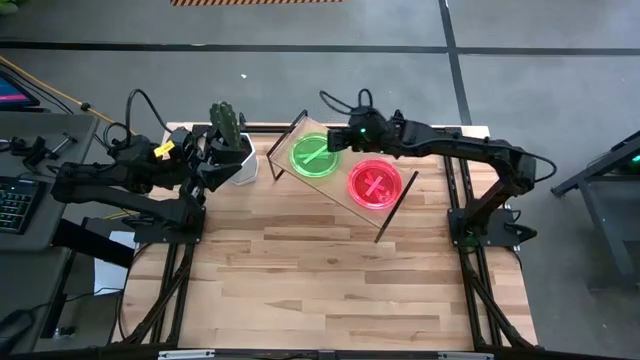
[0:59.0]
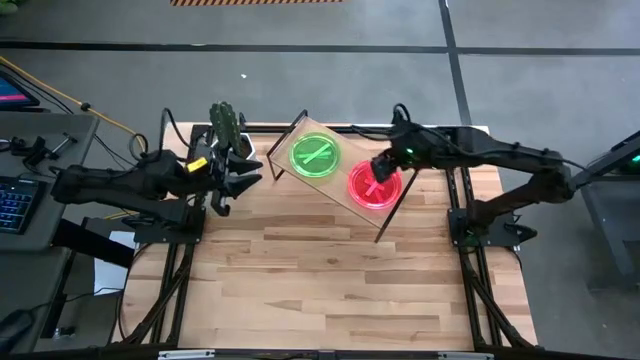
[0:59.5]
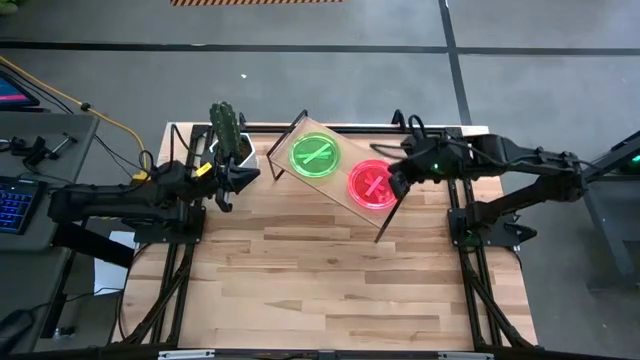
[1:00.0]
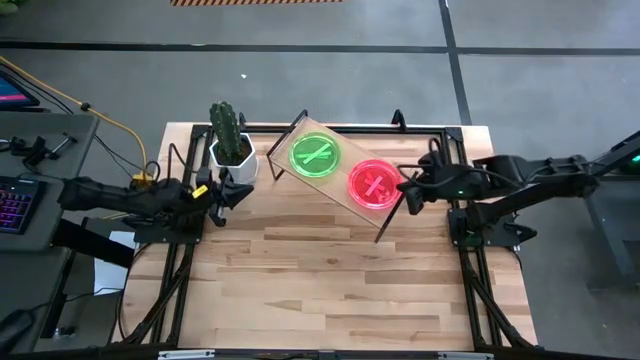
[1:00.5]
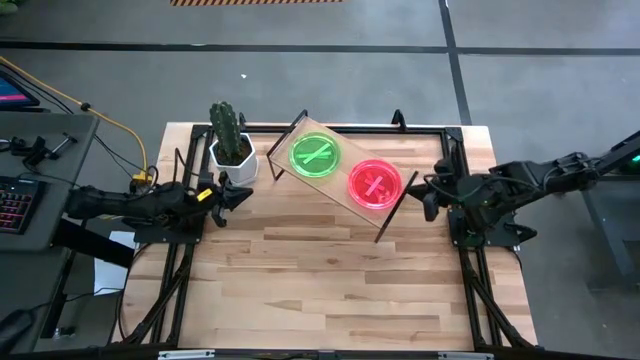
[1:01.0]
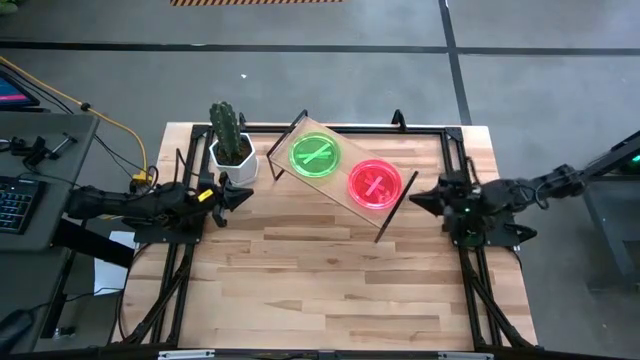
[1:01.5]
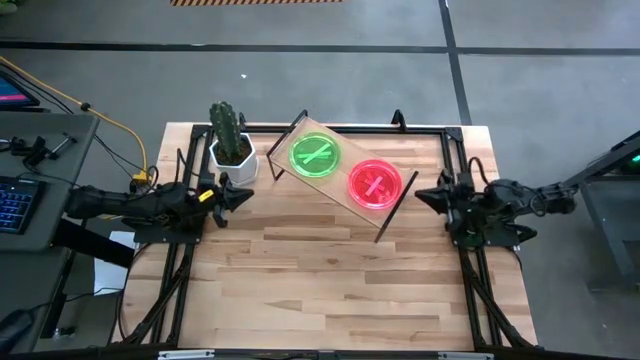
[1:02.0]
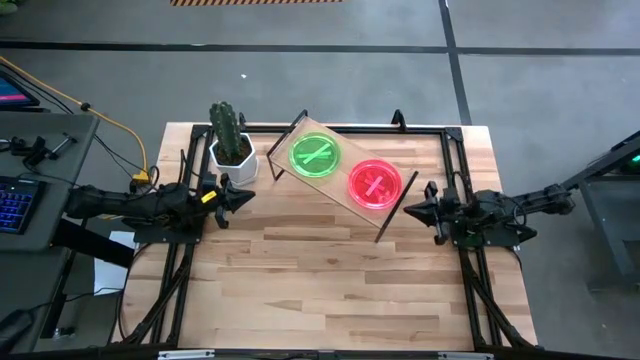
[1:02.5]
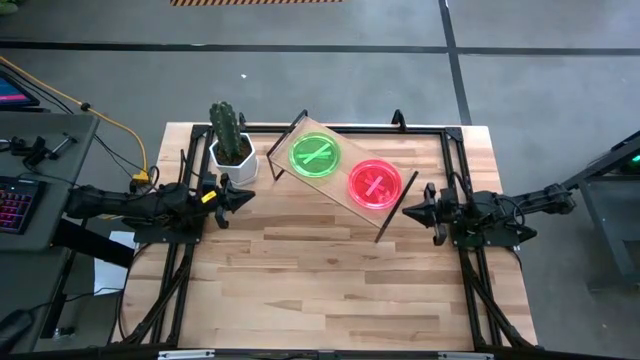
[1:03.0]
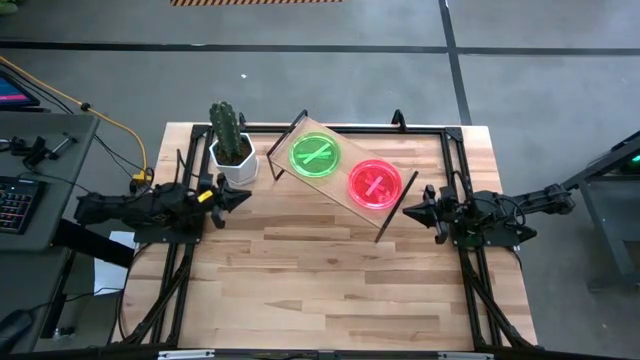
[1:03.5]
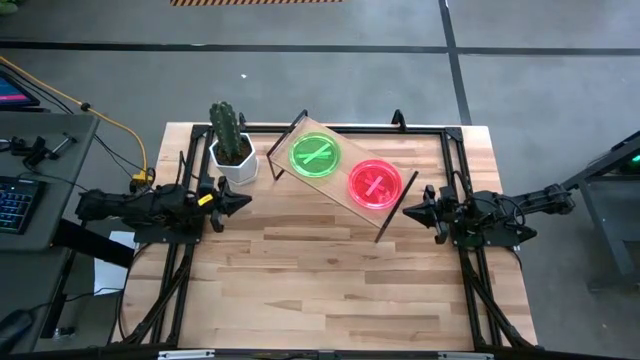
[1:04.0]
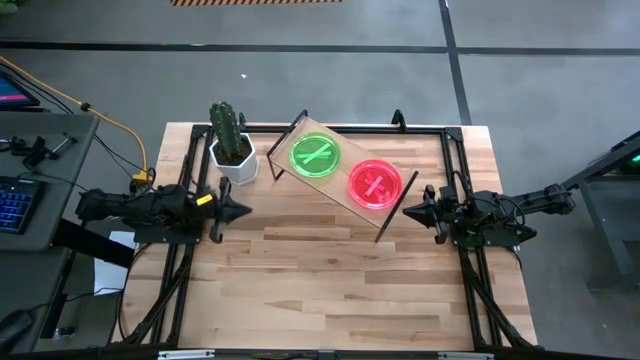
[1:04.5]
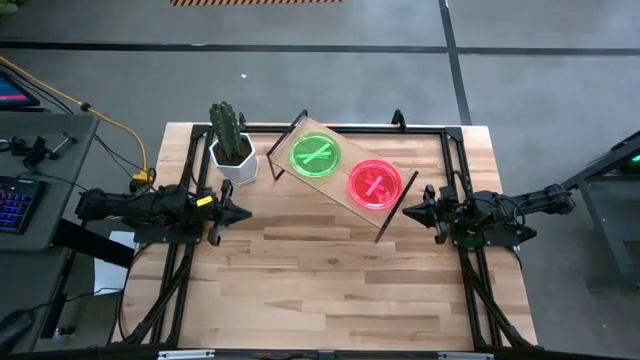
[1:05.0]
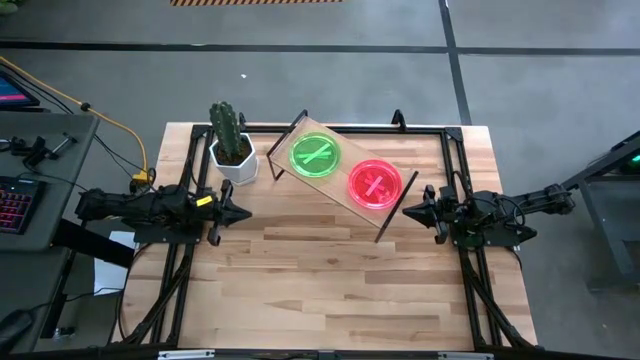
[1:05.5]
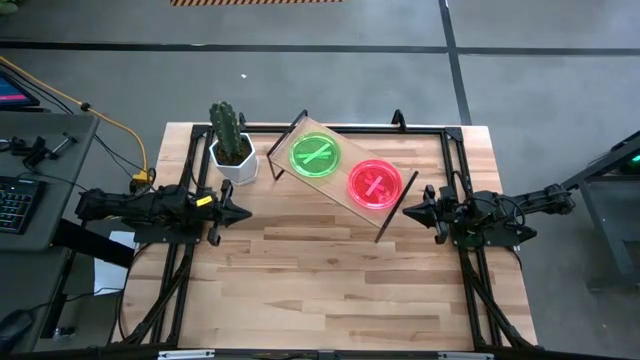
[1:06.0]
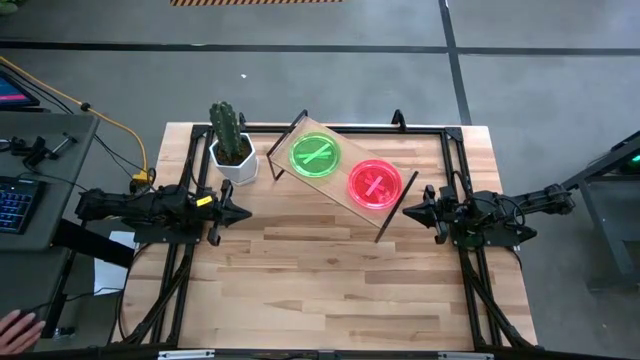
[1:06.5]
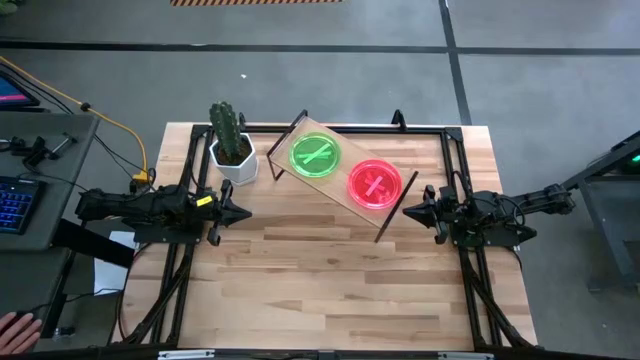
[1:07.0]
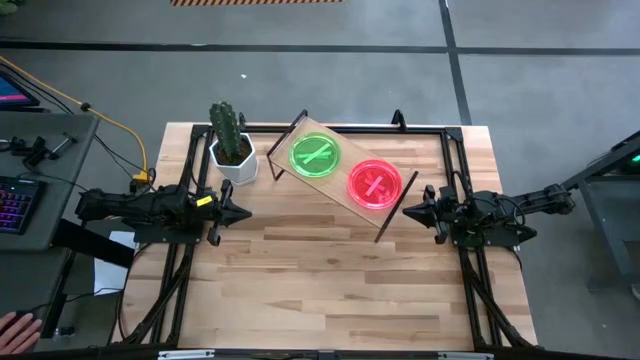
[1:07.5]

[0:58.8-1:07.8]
Task: Place and stack plates onto a shelf
Return to Home Position

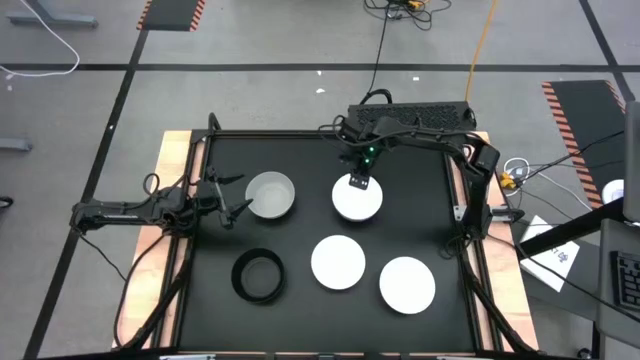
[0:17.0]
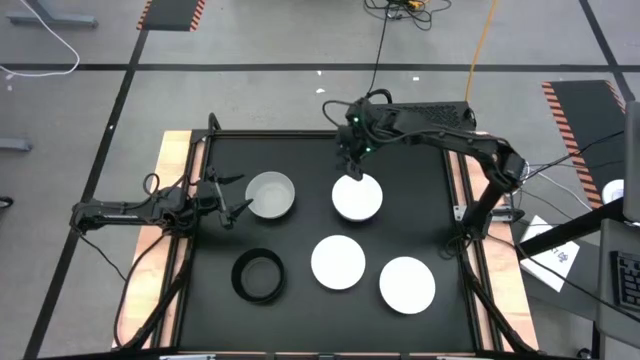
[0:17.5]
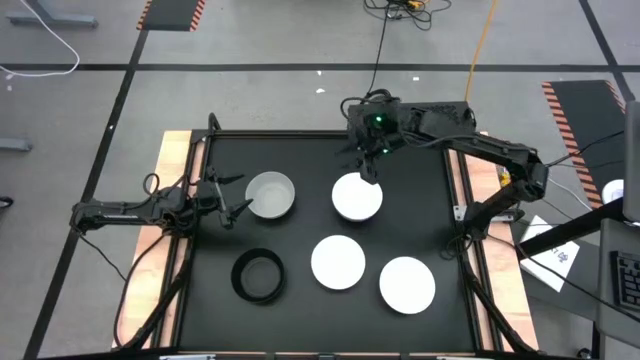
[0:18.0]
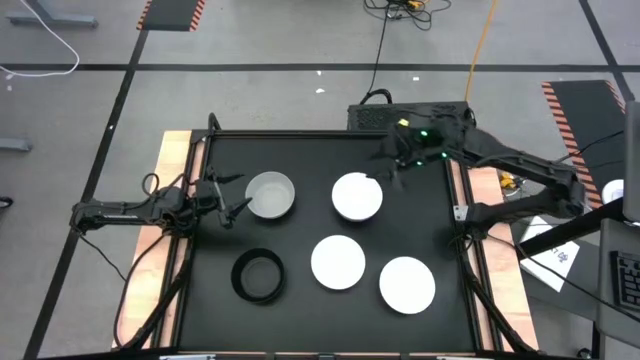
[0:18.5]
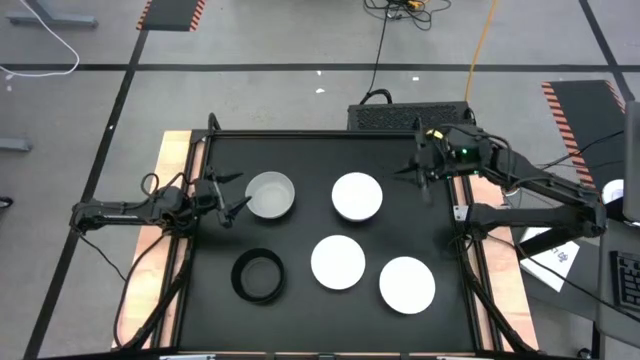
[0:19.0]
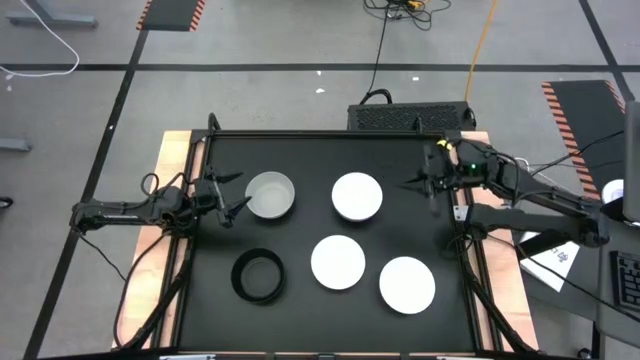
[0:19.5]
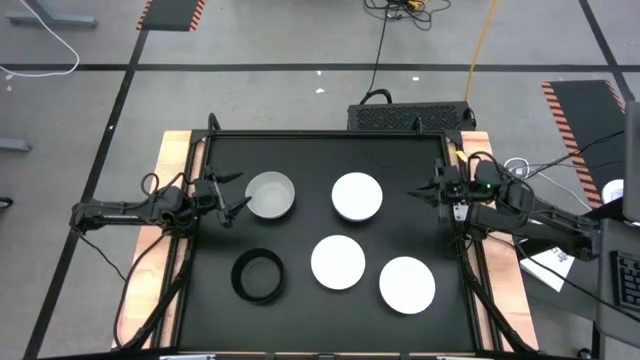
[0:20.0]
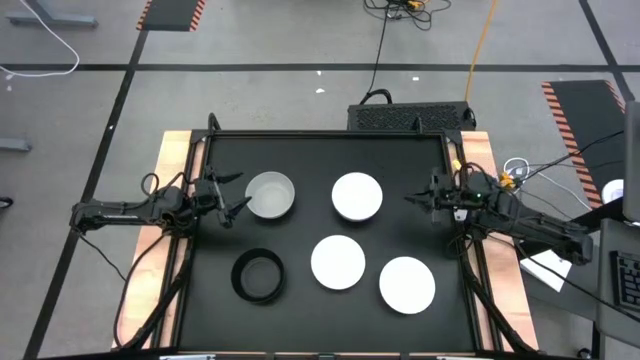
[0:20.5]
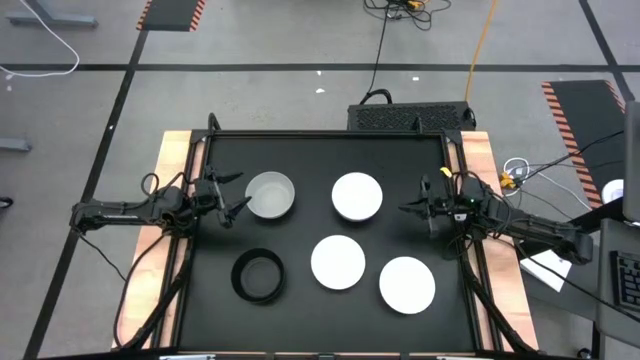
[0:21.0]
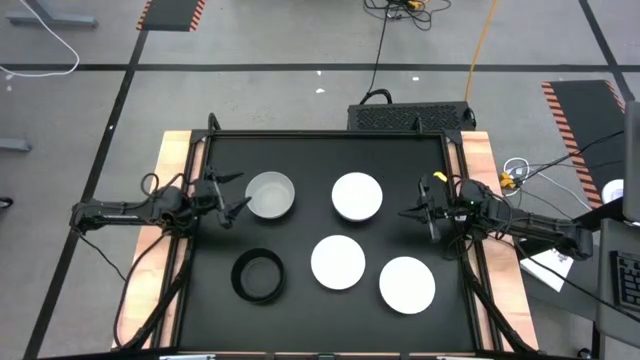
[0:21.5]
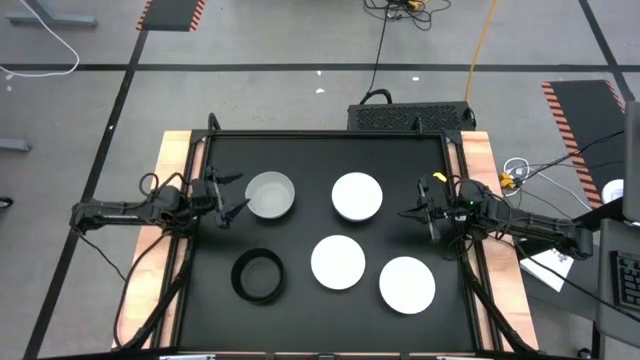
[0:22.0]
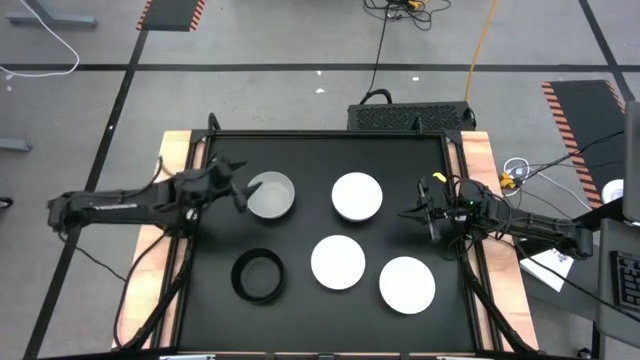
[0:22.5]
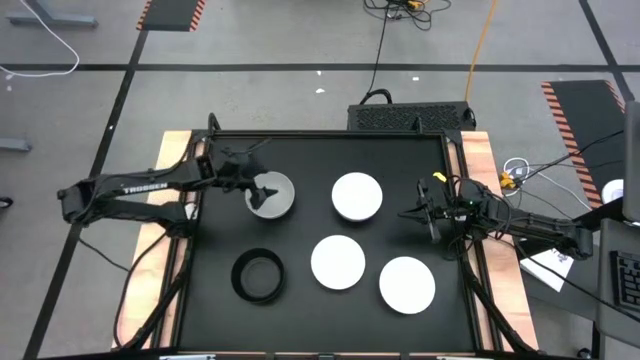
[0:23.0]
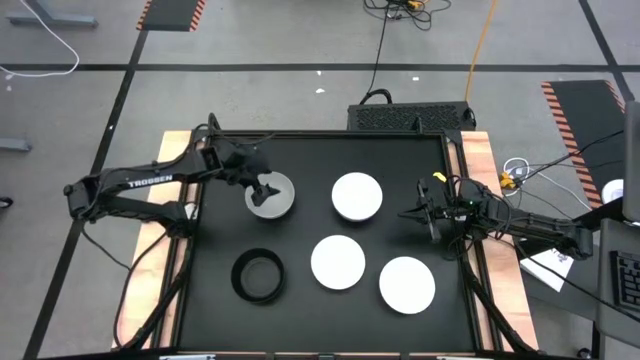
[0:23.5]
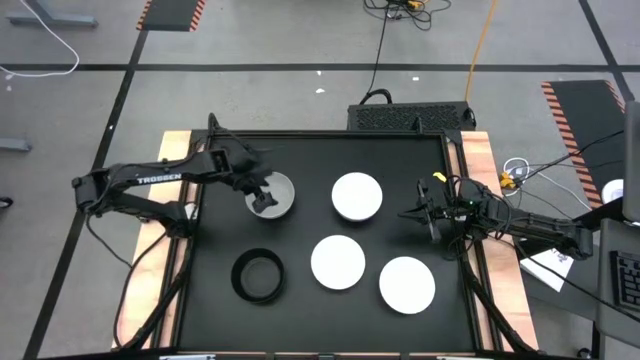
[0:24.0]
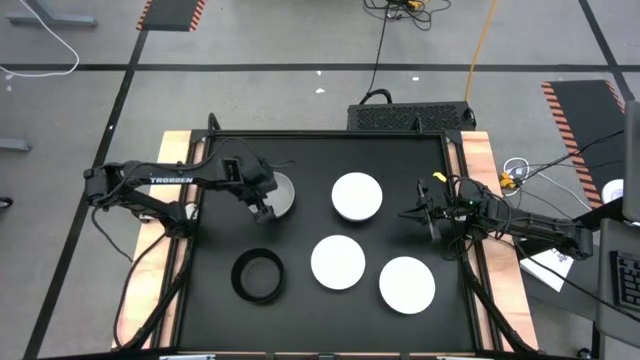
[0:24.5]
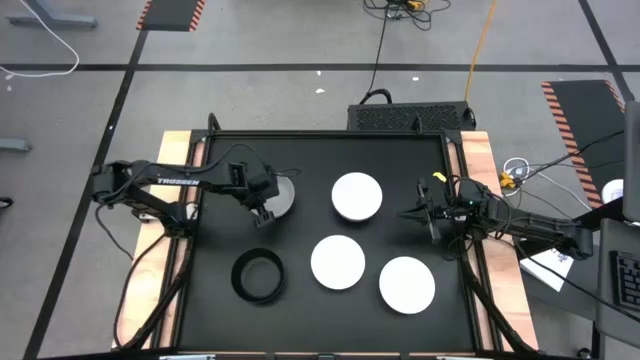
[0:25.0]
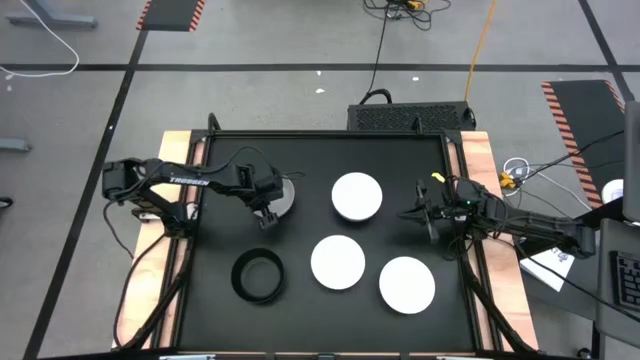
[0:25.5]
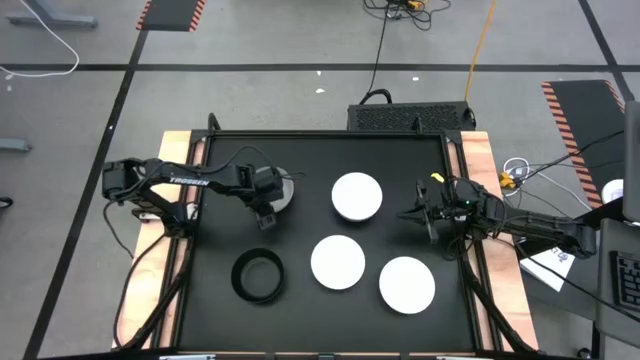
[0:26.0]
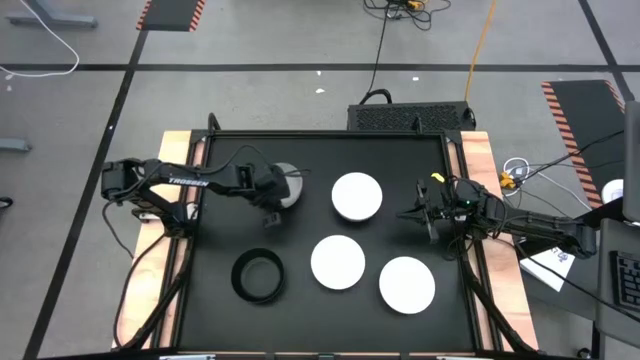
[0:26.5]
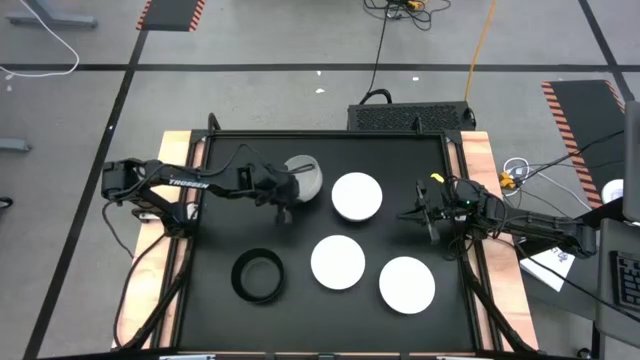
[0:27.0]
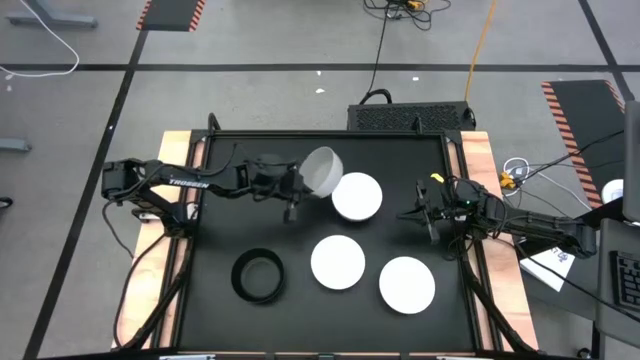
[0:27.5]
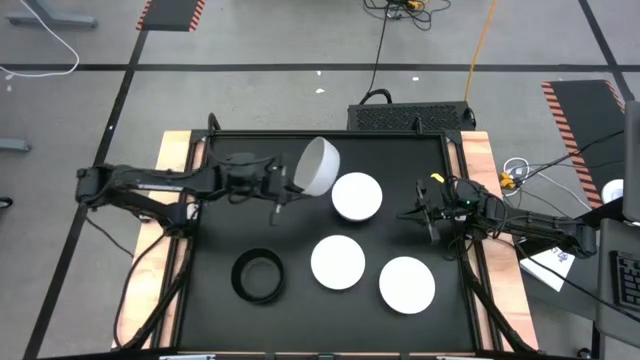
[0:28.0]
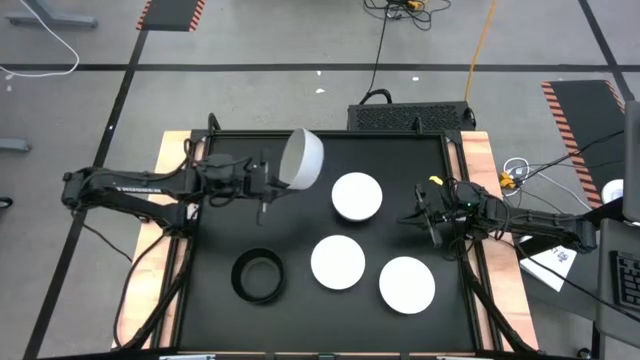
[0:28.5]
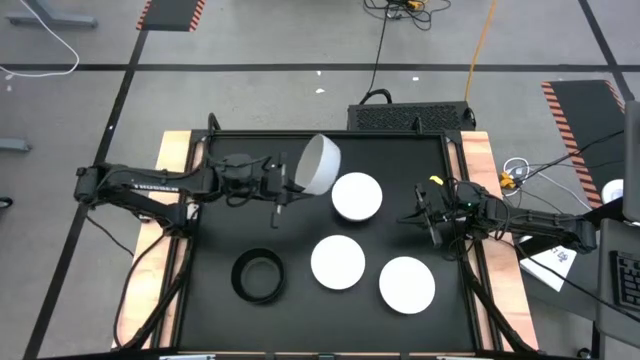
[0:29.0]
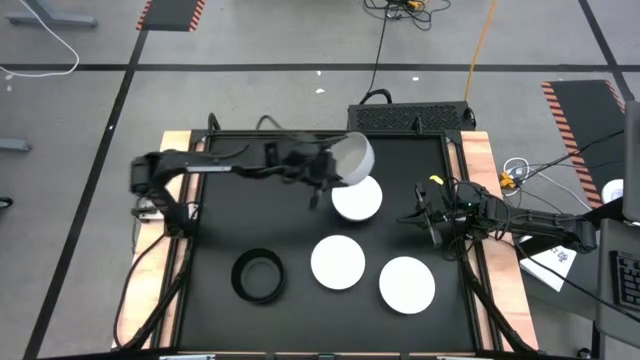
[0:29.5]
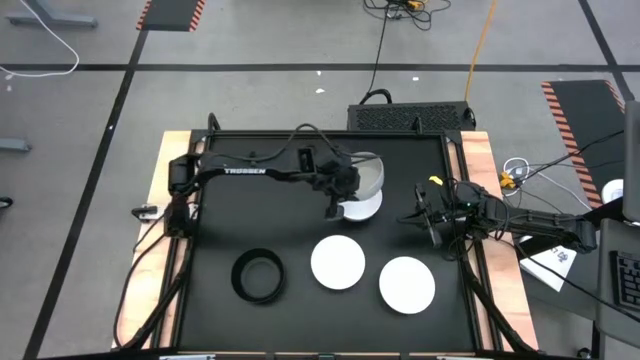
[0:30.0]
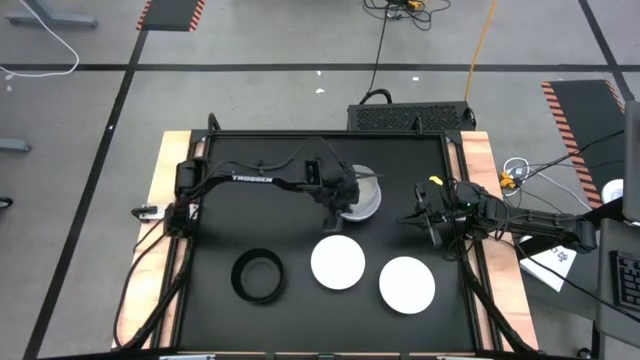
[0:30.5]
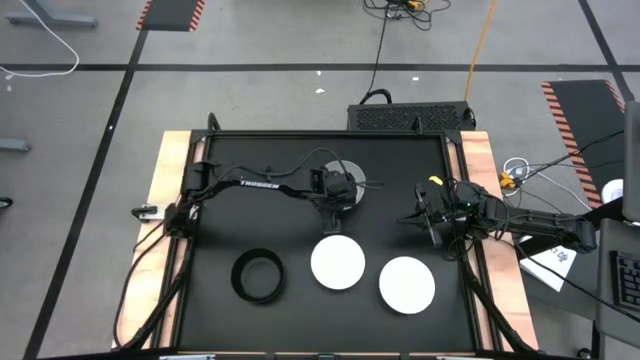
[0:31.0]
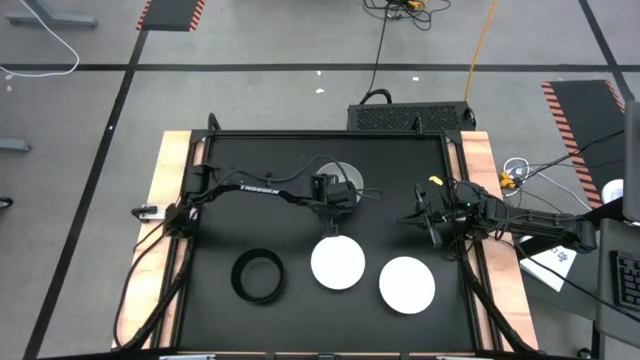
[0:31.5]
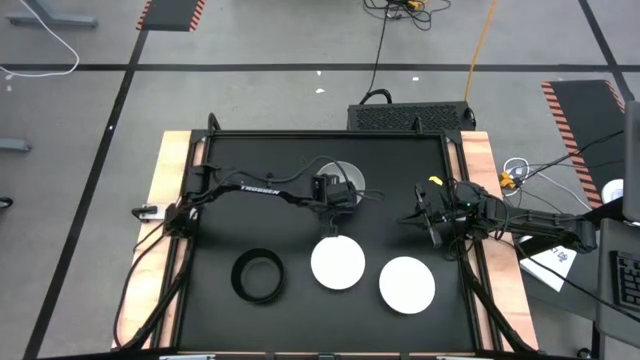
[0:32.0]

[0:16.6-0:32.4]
Task: Nest bowls inside each other
Stack the gray bowl on top of the top white bowl
